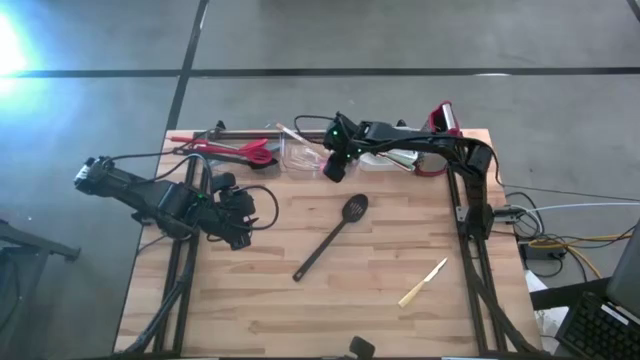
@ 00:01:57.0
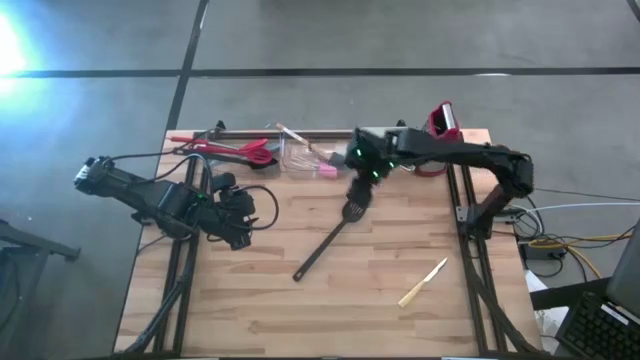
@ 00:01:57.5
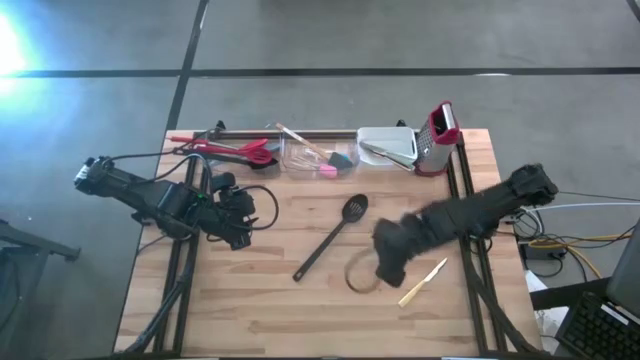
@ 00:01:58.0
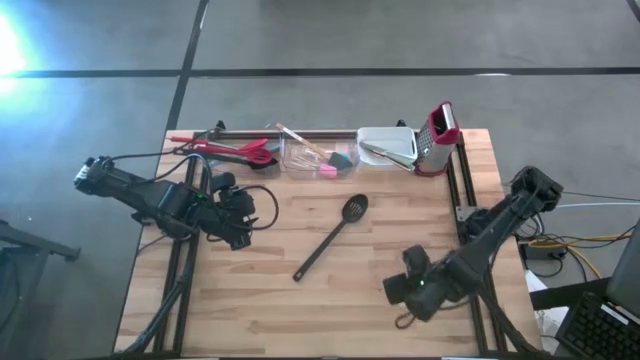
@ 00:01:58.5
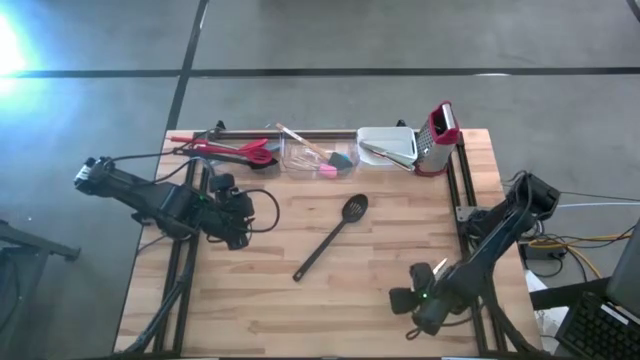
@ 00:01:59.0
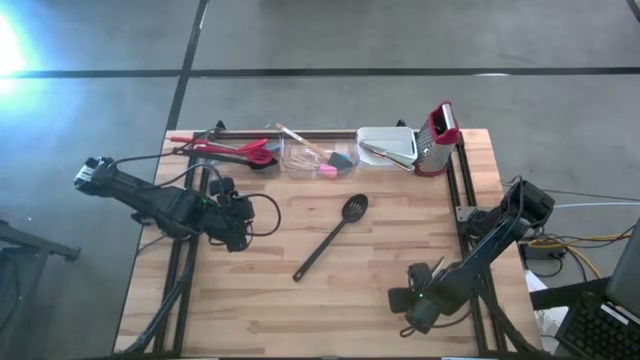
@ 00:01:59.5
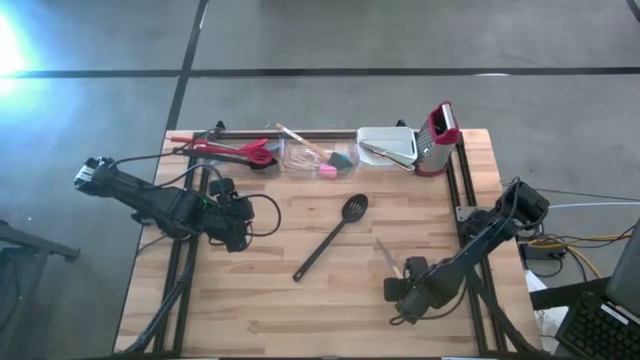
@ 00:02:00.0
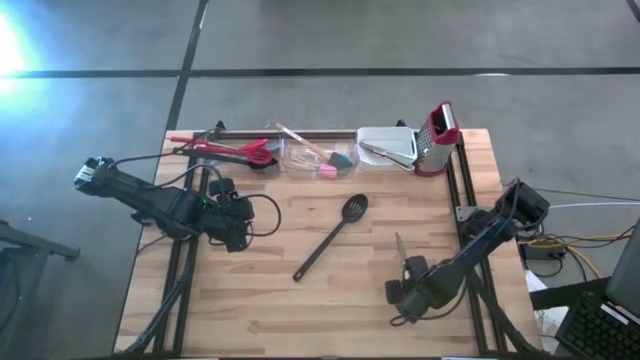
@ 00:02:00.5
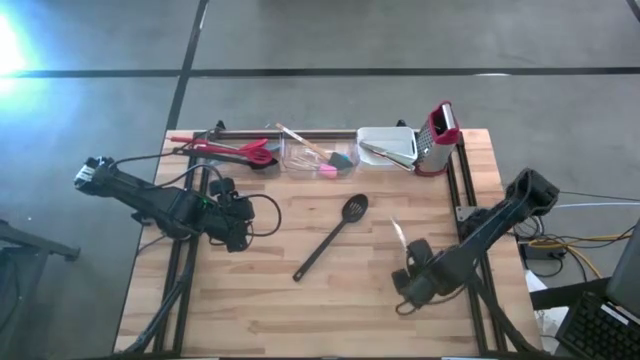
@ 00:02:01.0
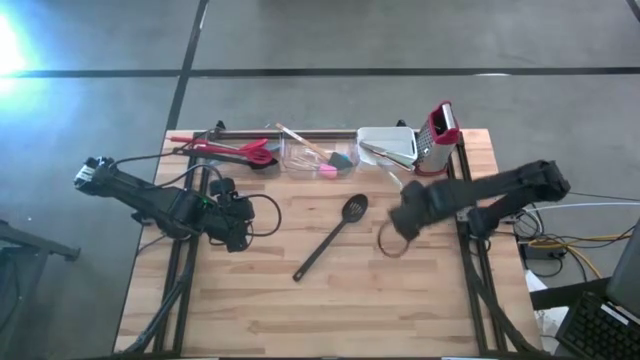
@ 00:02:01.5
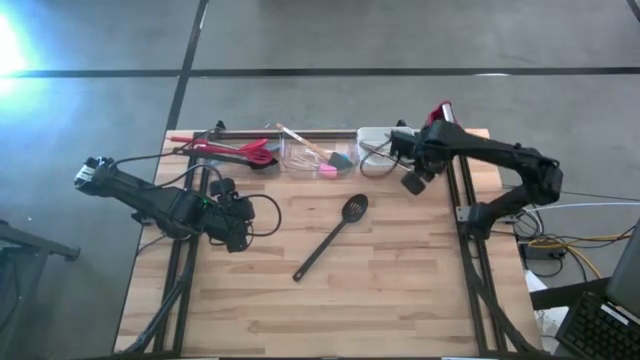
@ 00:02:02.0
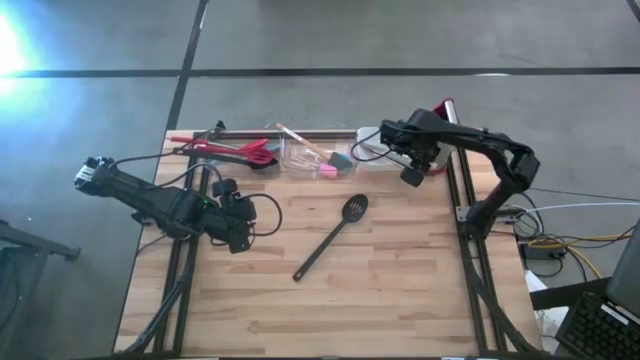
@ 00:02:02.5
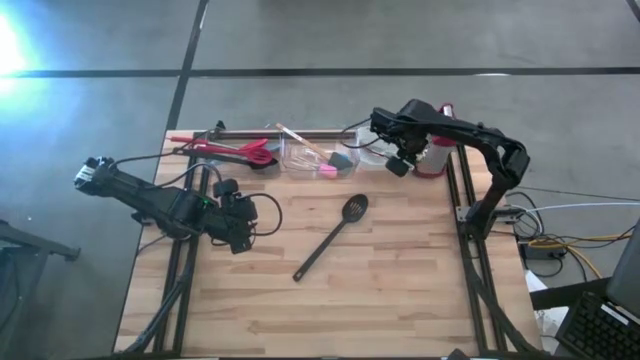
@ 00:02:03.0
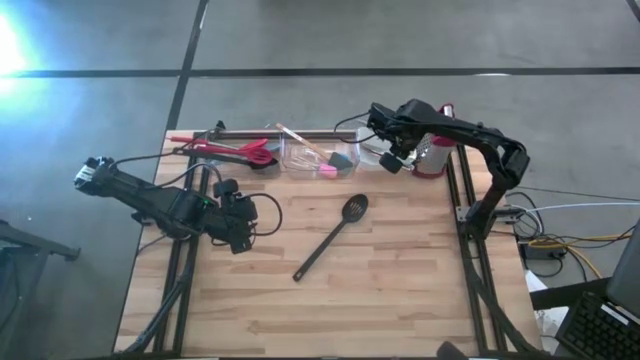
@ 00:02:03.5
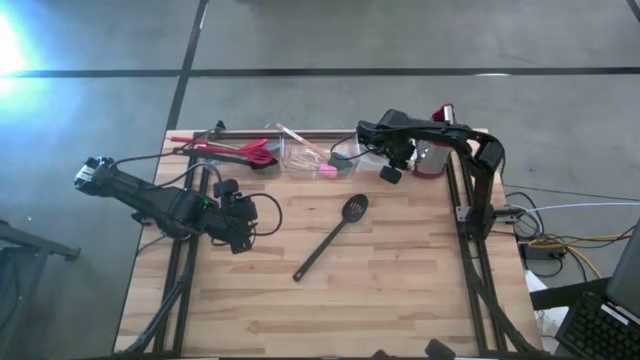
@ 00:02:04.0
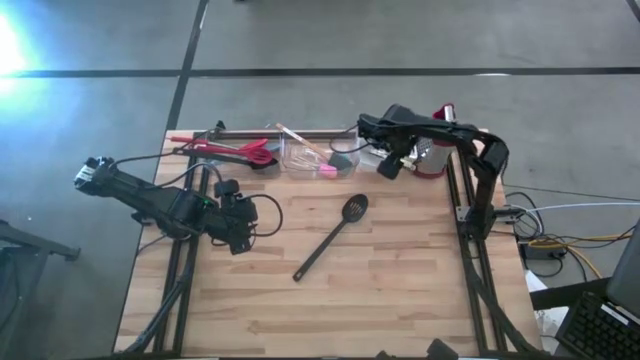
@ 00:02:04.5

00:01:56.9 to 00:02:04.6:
Task: Pick & Place Kitchen Items
Put the yellow table knife into the white bin

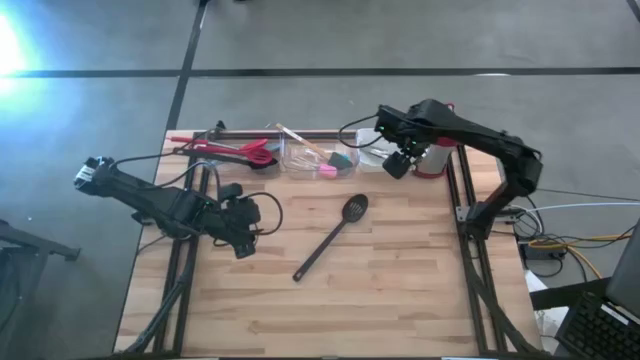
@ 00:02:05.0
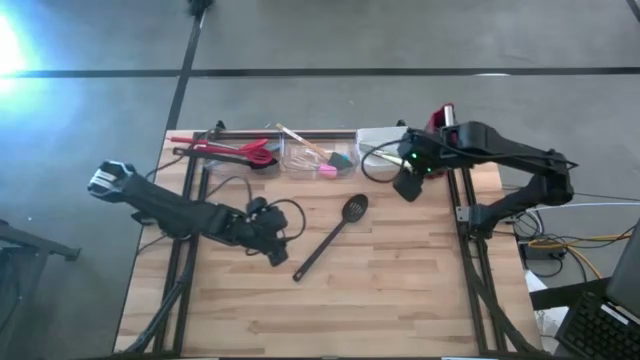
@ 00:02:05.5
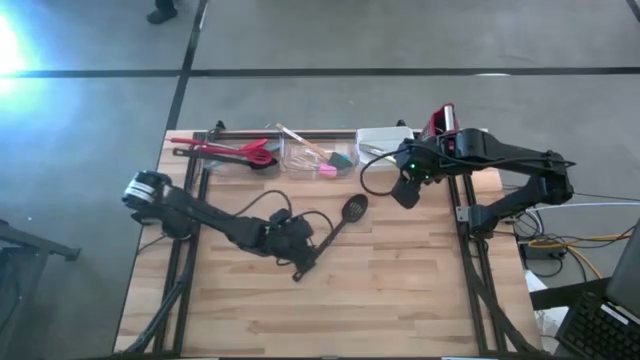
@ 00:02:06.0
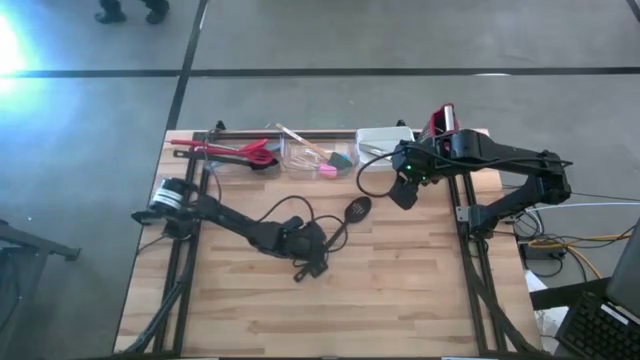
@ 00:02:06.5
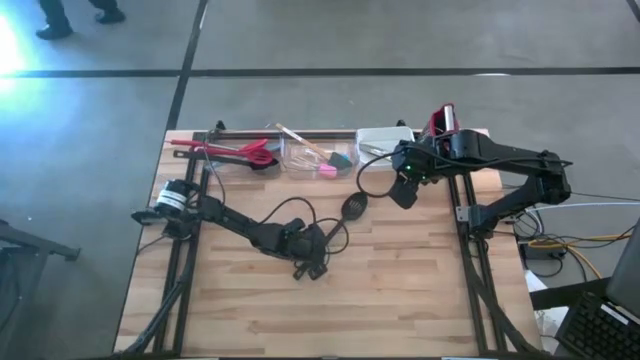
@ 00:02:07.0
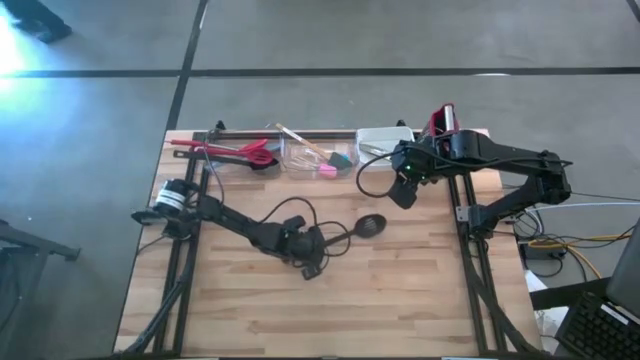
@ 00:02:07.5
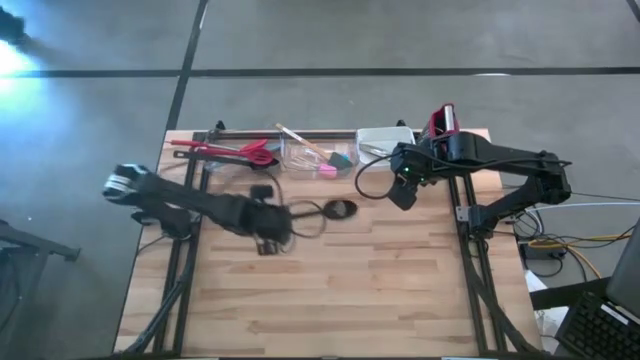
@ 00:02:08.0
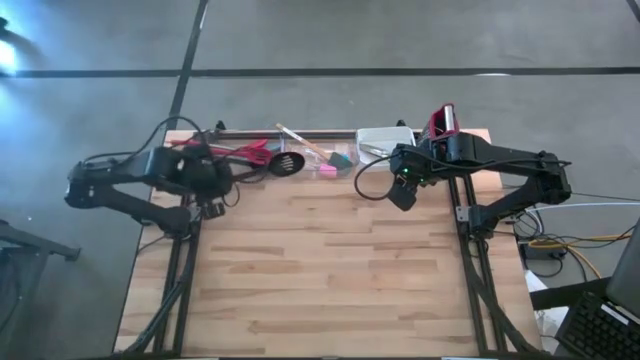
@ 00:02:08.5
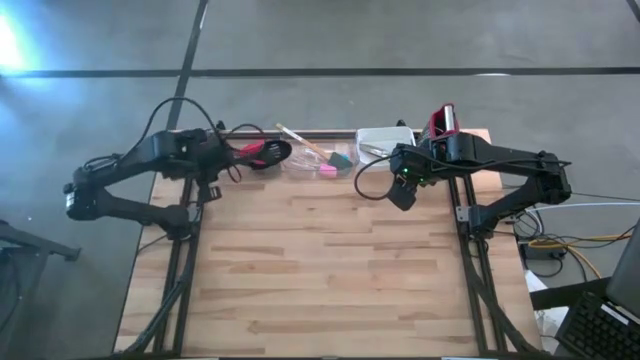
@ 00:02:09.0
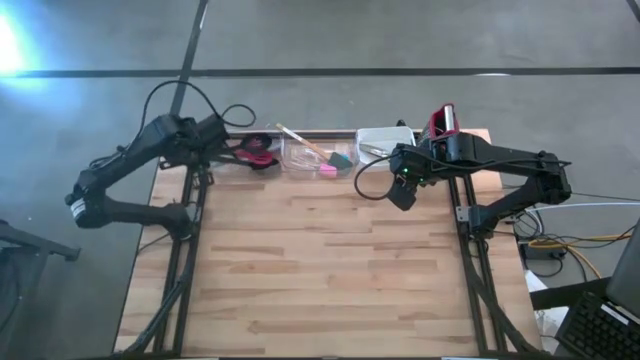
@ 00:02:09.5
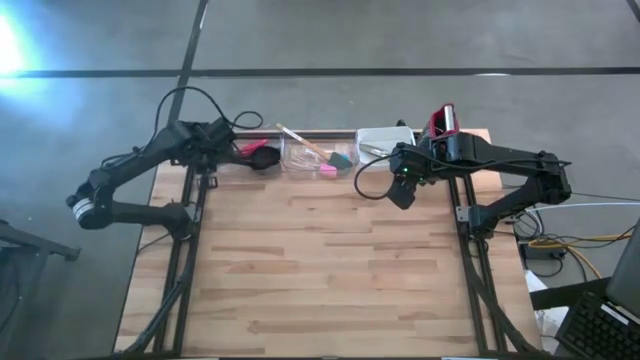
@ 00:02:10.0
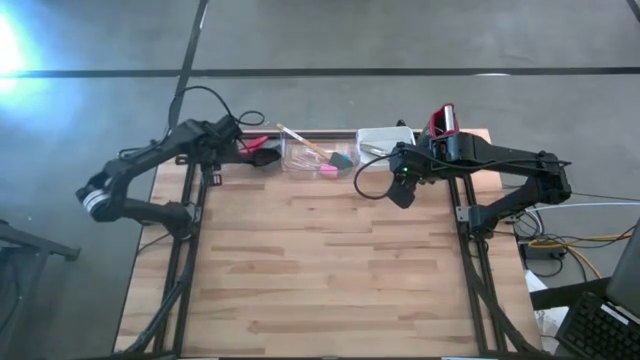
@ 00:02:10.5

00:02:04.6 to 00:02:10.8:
Put the black serving spoon into the left transparent bin

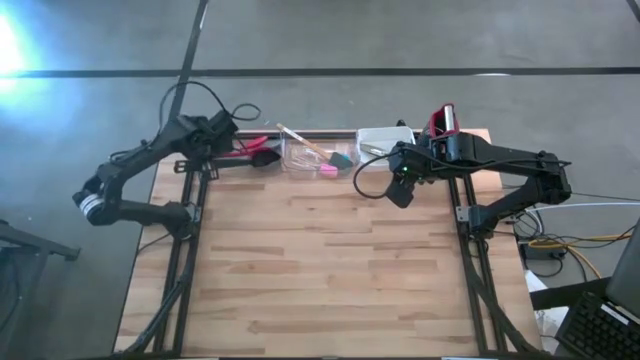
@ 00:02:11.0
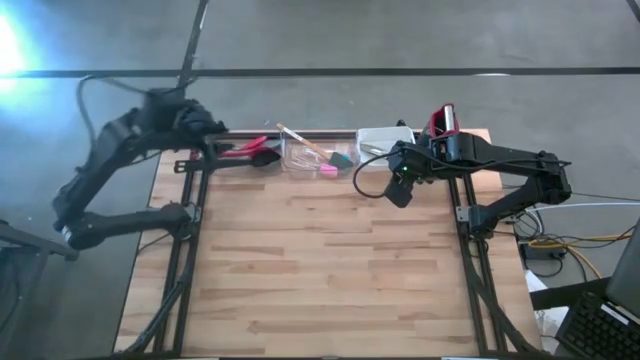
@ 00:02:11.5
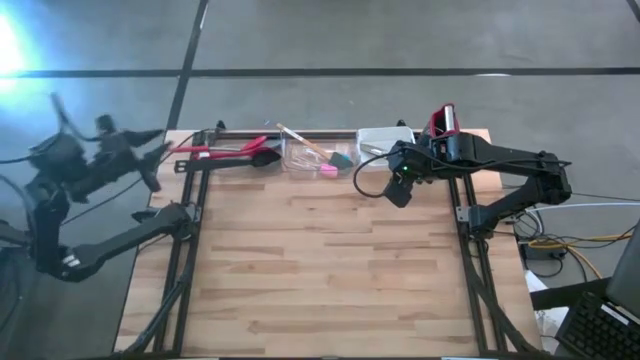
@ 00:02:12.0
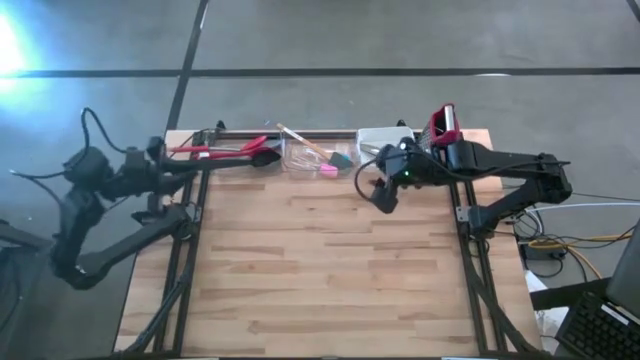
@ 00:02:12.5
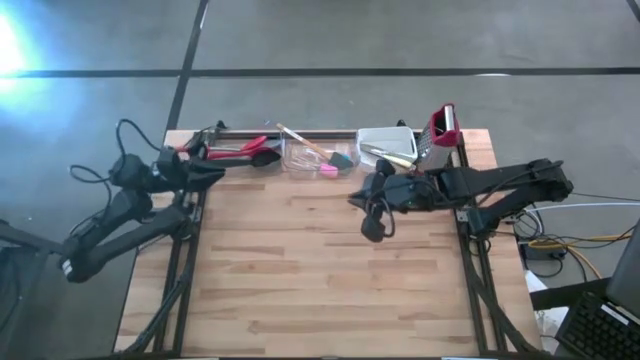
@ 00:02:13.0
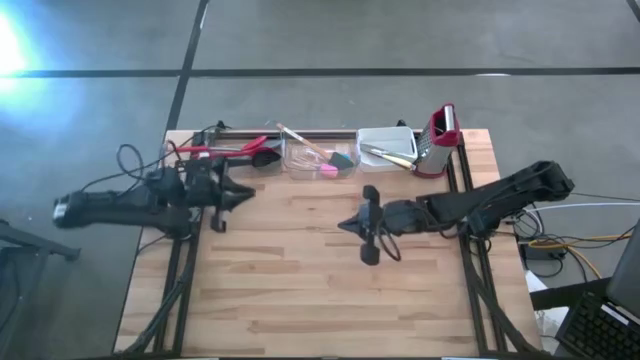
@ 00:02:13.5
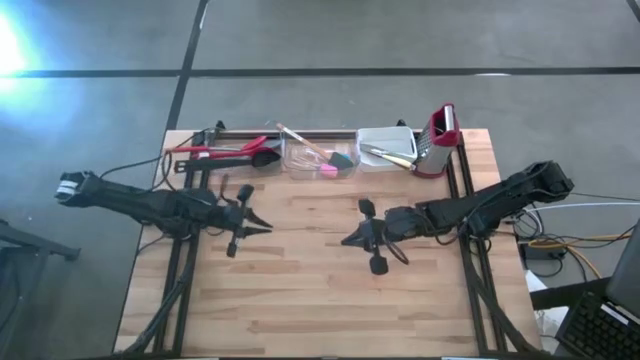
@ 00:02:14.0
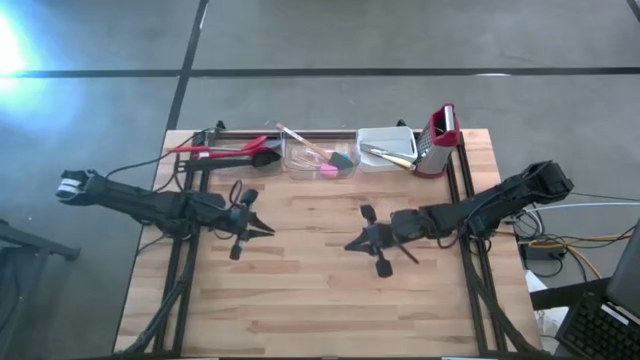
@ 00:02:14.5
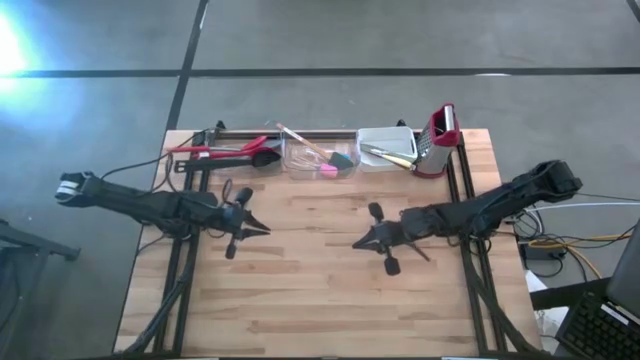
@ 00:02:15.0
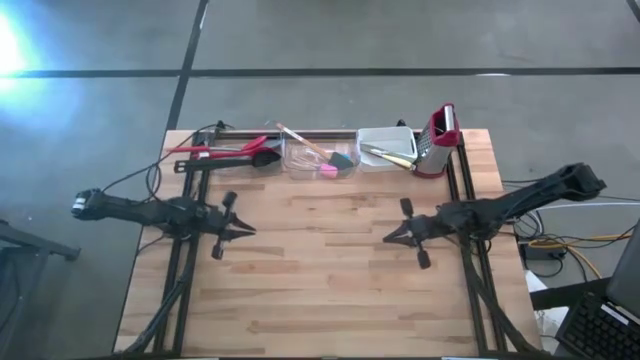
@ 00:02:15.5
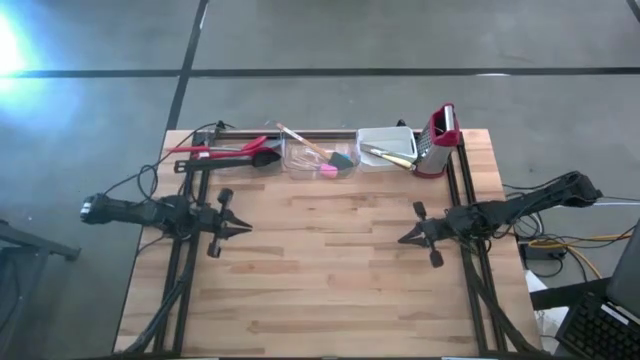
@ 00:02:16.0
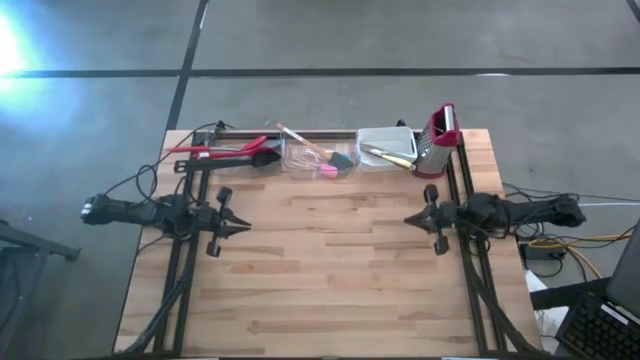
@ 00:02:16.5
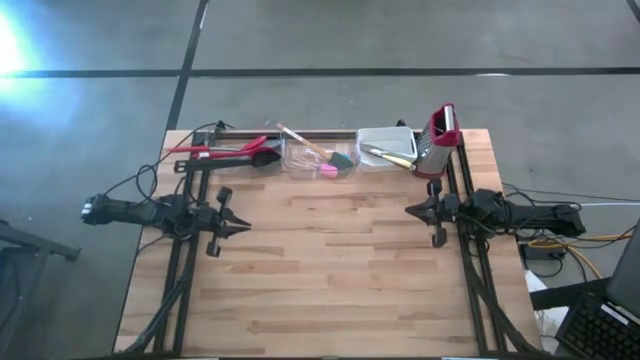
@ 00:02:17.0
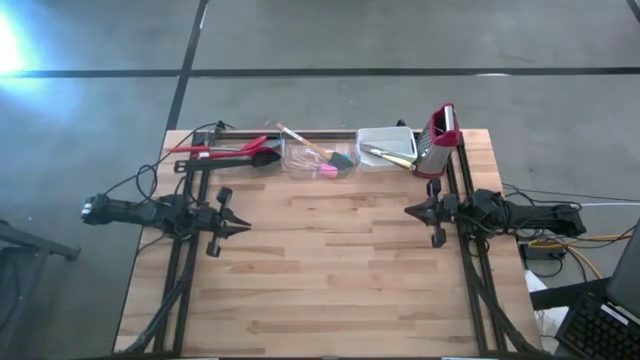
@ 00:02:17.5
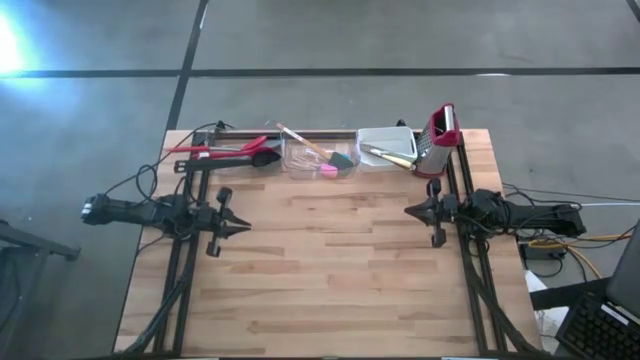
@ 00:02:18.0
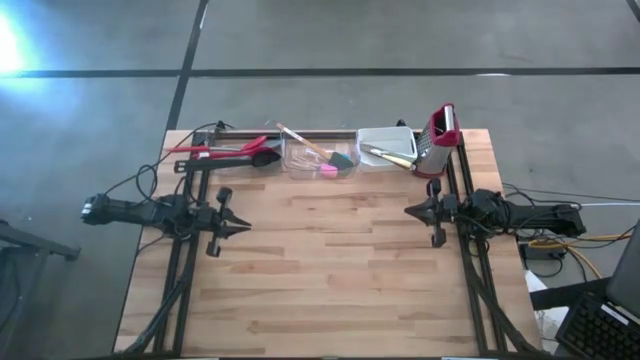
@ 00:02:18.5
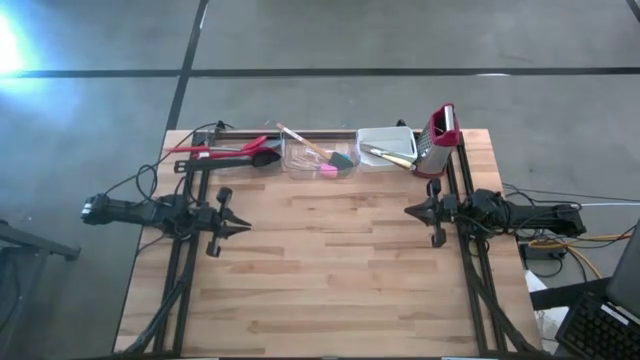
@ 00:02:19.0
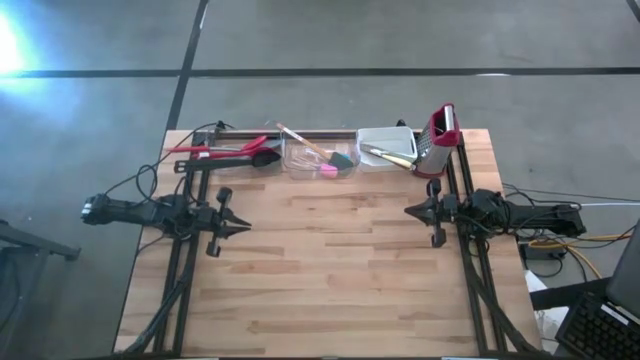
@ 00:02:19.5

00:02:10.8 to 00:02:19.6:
Return to Home Position
